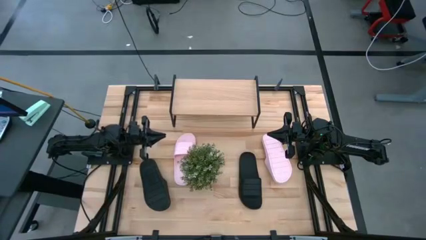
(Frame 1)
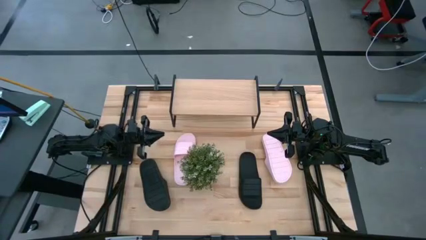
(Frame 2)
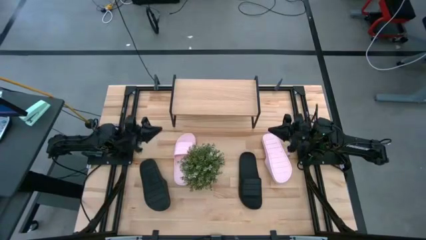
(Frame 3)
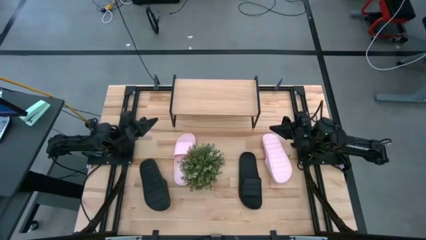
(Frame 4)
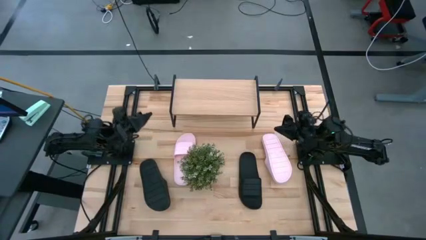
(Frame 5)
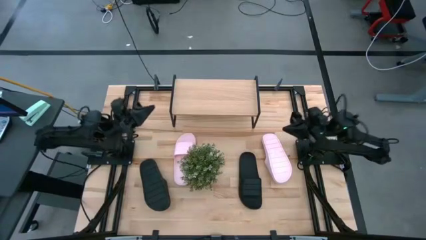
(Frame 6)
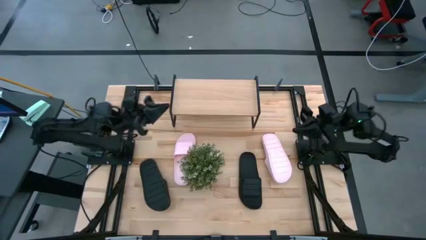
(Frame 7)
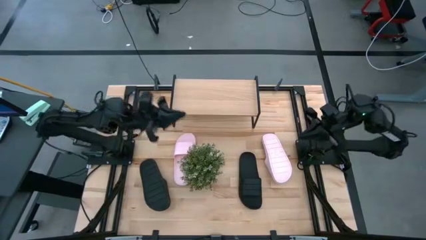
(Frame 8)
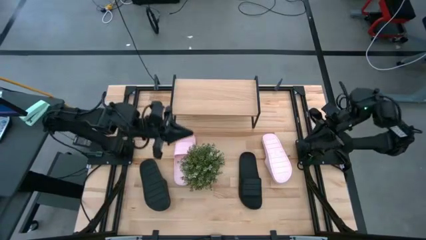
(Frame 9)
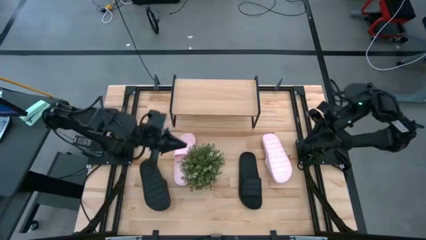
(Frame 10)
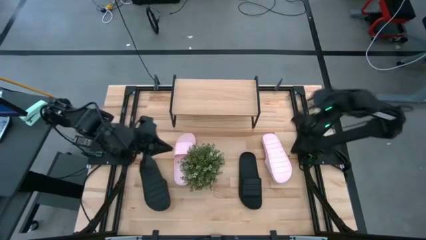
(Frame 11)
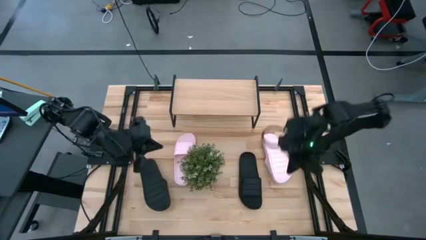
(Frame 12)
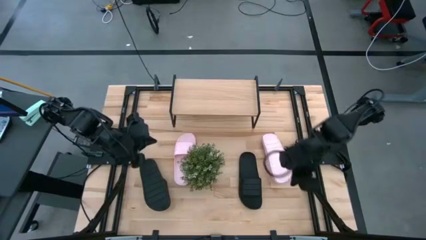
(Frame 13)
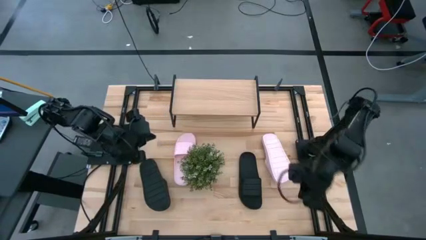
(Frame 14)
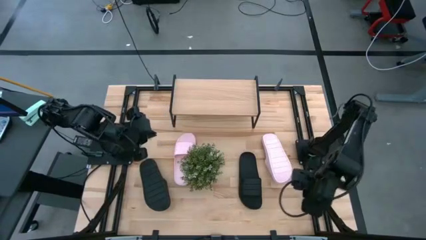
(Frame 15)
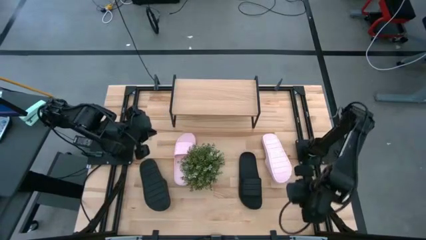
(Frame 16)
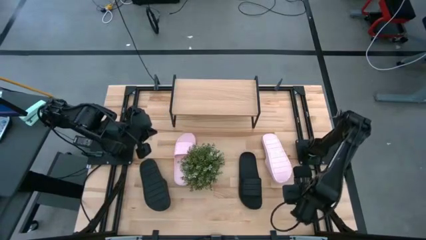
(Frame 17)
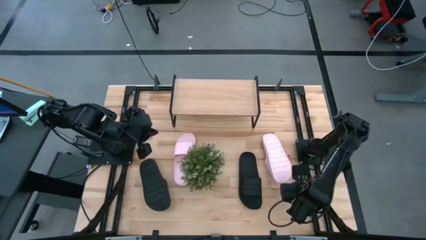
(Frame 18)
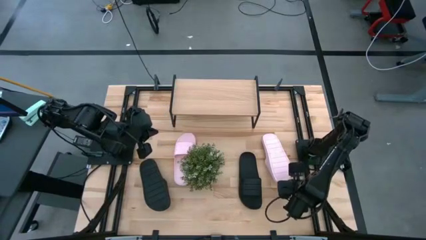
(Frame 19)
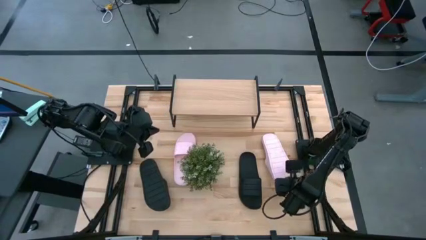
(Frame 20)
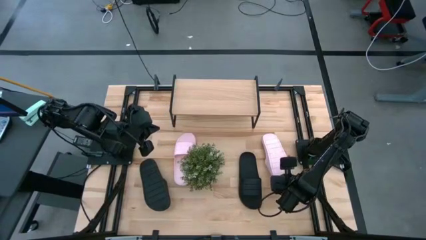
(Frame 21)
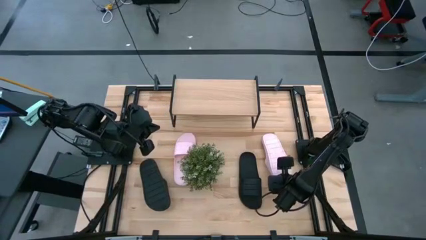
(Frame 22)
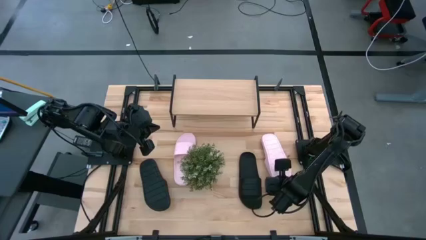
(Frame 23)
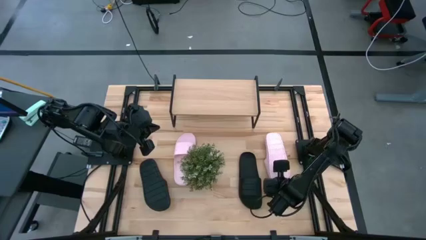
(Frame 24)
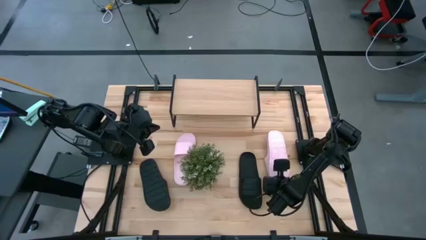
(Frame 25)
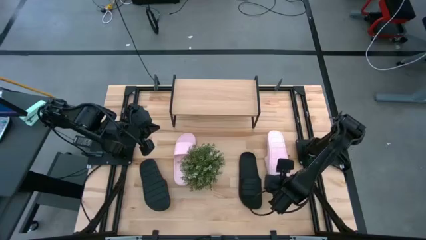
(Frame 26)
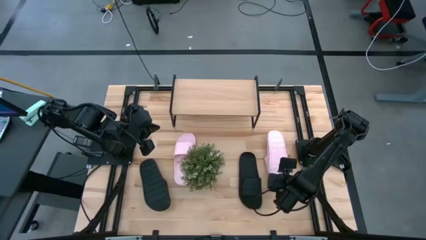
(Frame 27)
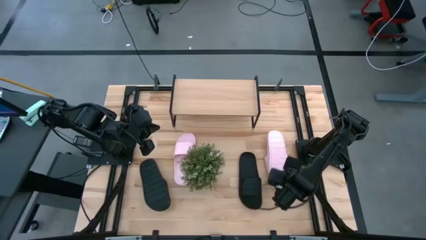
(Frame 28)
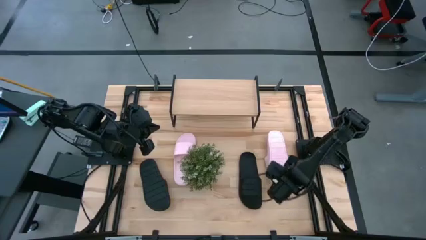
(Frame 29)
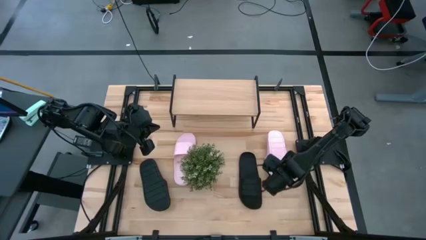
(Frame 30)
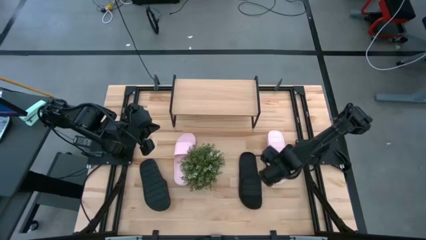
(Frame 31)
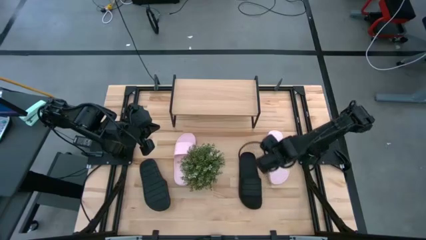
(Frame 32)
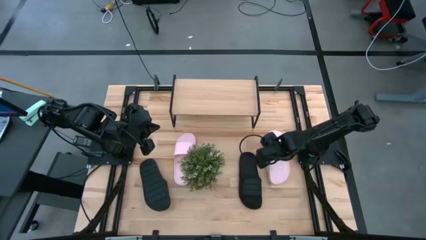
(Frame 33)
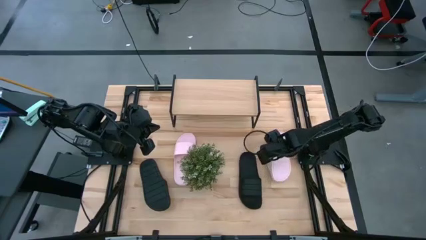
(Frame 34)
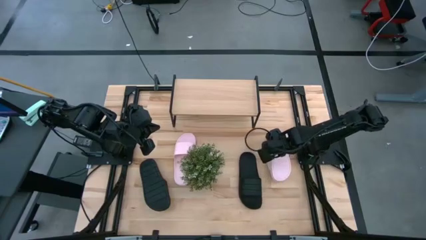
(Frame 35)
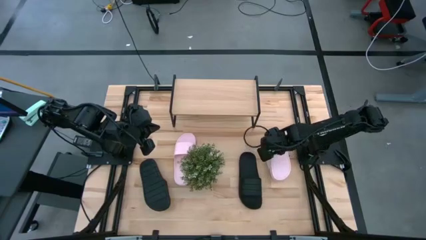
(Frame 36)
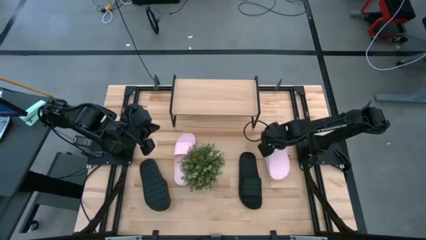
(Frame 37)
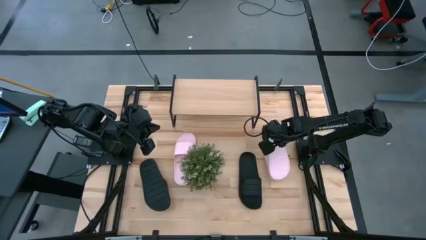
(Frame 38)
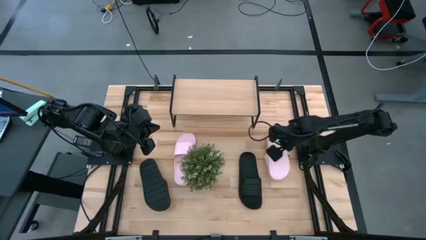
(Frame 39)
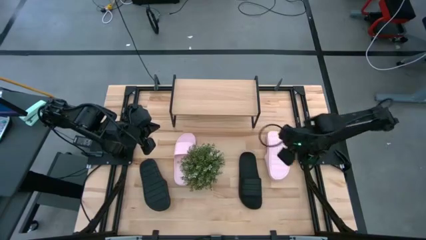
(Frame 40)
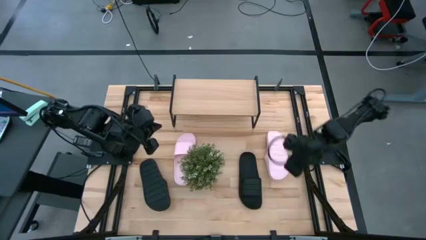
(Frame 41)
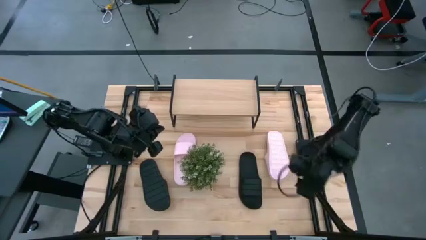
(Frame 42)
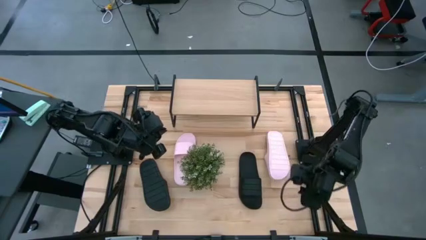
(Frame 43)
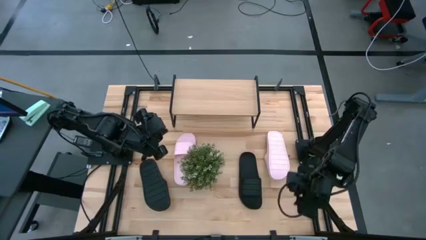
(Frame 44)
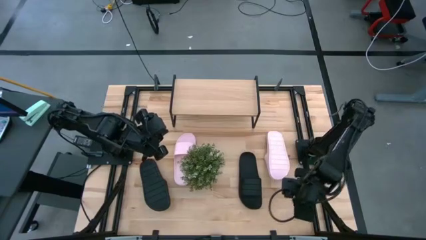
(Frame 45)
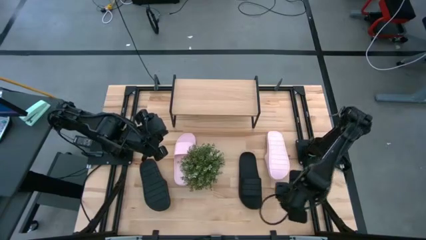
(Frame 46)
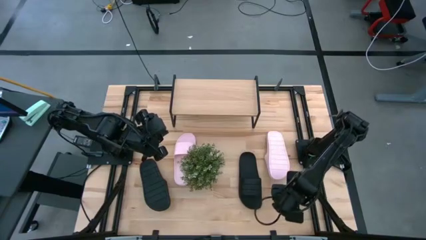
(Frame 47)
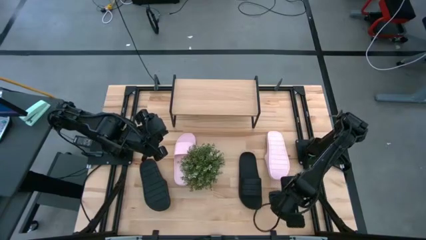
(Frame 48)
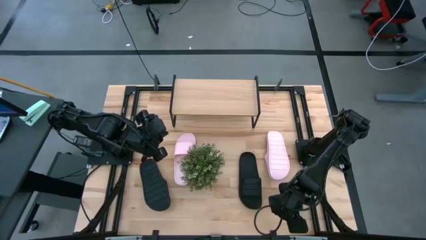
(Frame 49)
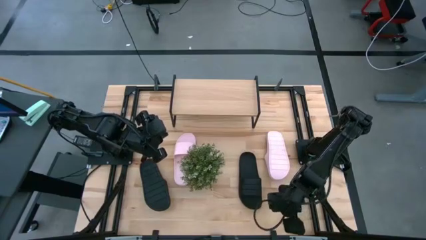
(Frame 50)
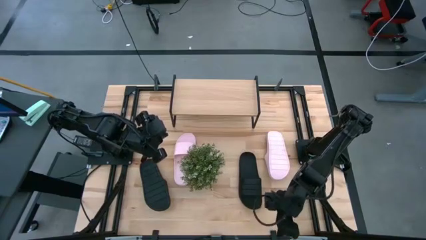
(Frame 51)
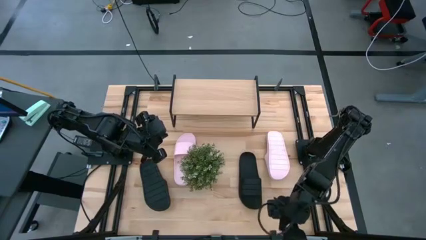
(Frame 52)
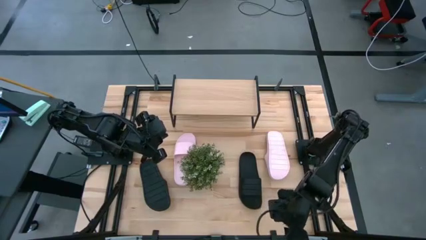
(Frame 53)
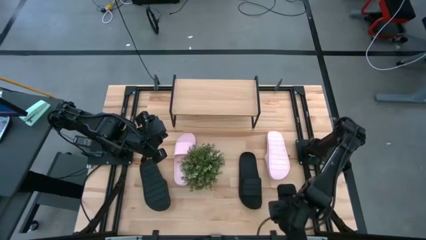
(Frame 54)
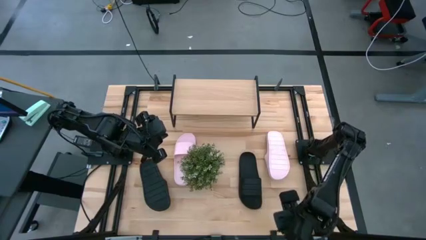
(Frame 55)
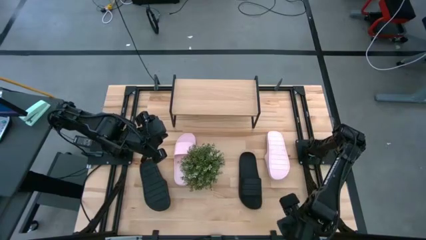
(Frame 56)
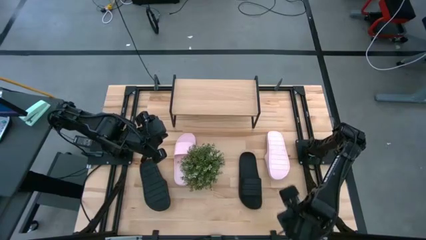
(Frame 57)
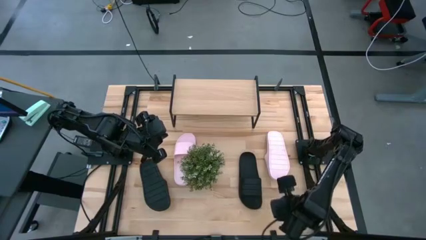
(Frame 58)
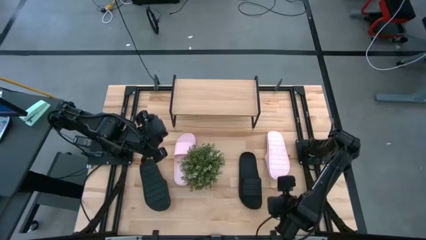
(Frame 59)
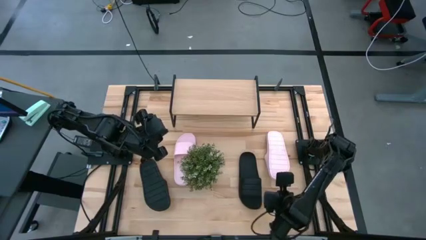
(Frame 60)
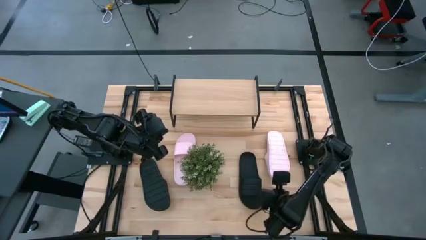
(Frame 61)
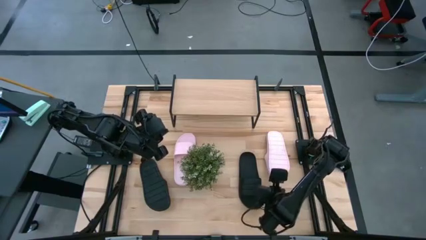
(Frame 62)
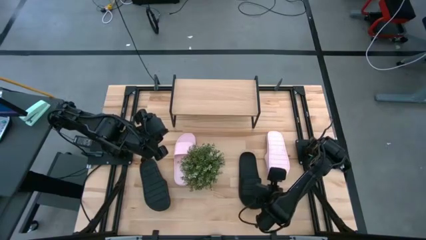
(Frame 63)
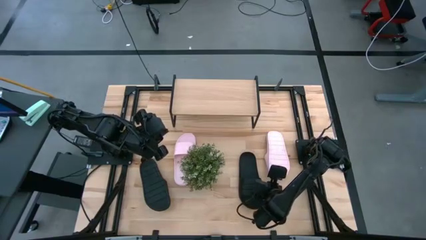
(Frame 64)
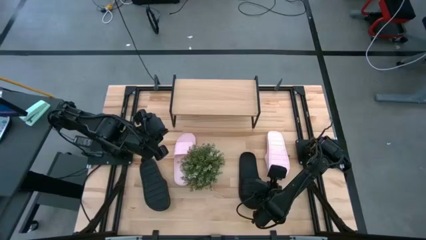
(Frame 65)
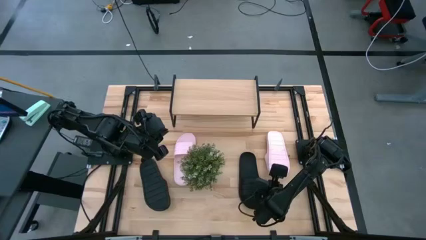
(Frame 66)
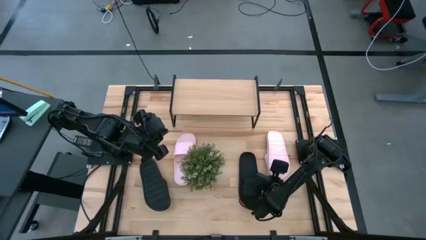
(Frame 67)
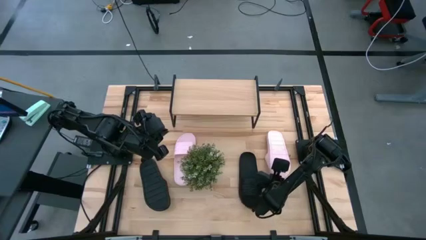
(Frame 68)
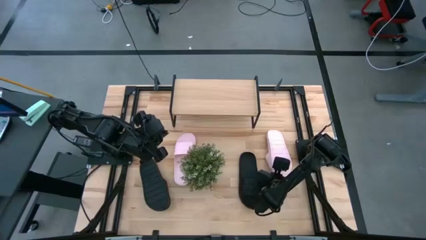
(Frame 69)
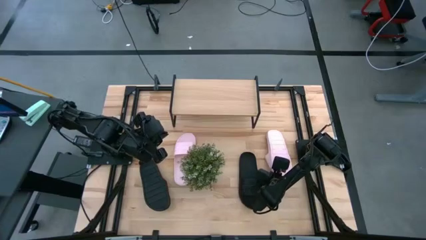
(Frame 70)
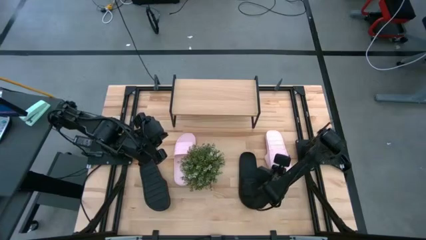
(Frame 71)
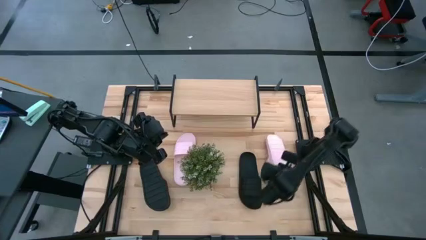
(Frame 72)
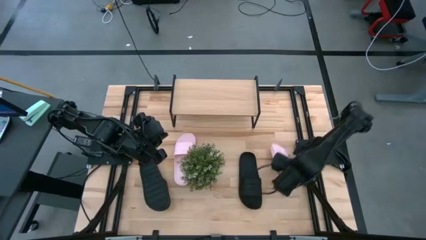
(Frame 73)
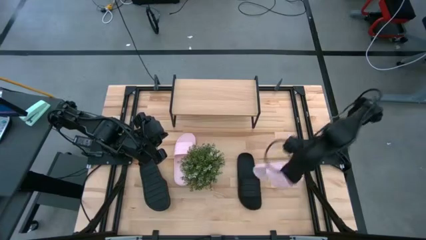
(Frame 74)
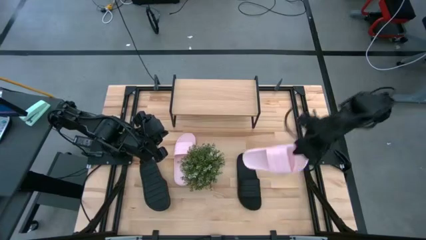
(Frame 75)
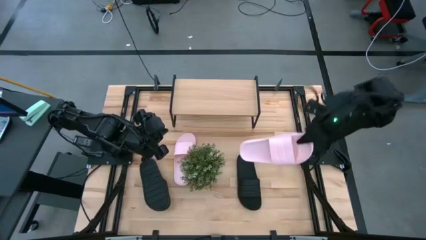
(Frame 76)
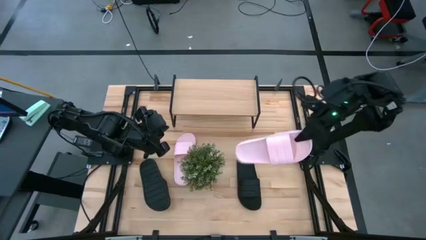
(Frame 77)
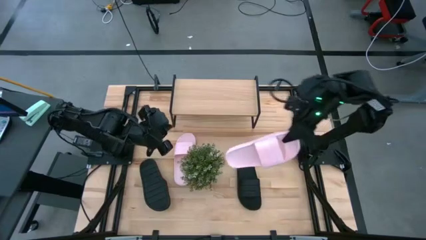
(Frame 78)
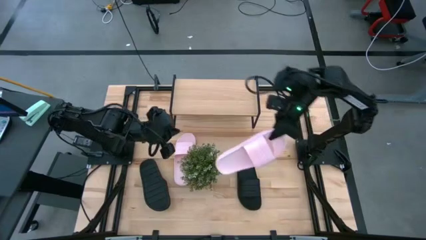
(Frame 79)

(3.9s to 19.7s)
Task: Pick and place slides into the shelf
Put the right pink slipper on the shelf
